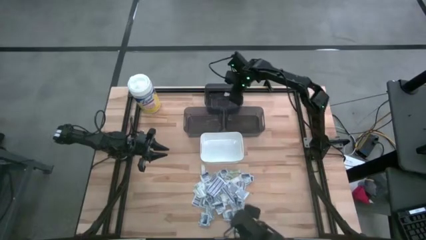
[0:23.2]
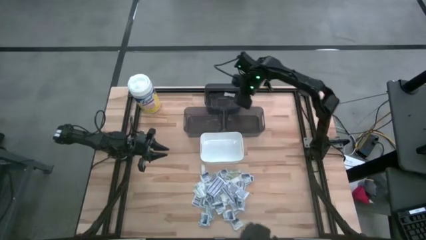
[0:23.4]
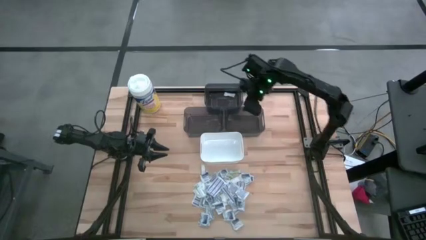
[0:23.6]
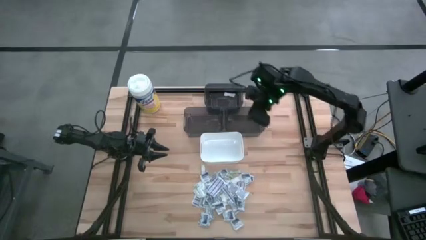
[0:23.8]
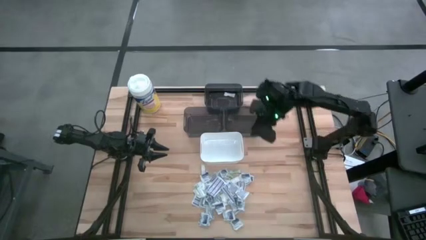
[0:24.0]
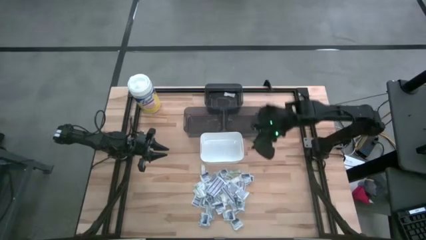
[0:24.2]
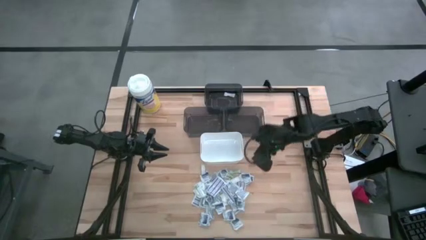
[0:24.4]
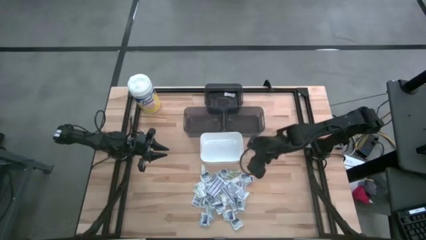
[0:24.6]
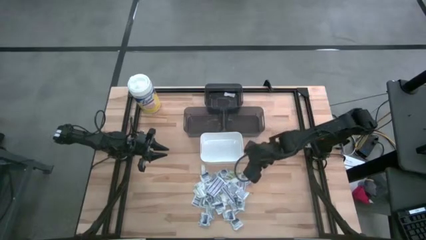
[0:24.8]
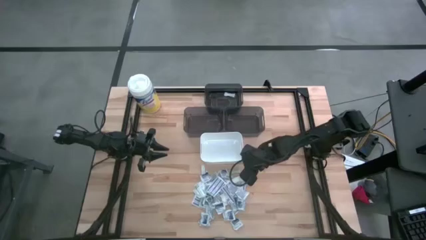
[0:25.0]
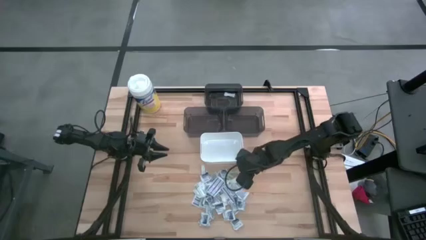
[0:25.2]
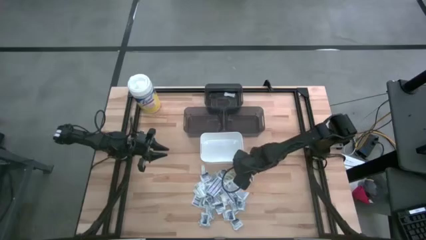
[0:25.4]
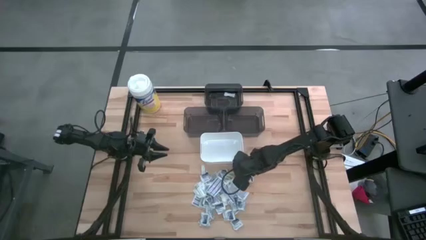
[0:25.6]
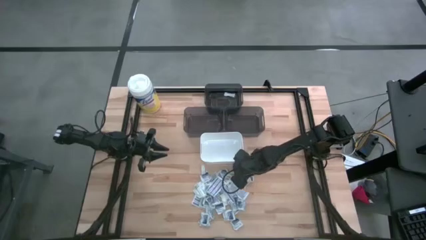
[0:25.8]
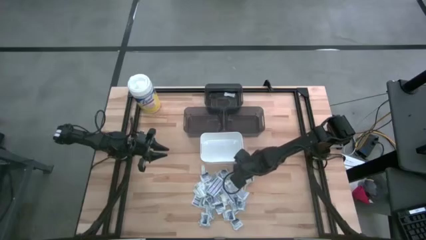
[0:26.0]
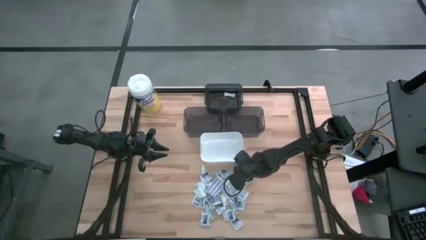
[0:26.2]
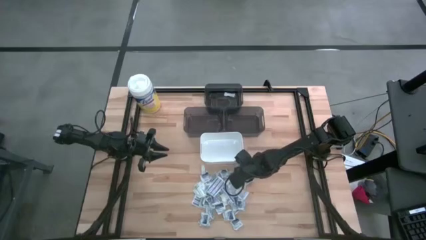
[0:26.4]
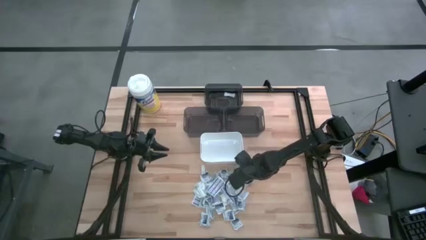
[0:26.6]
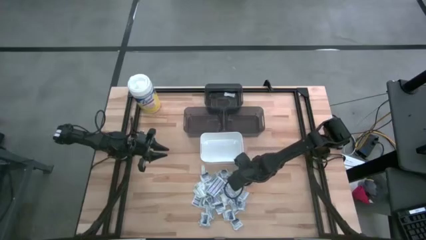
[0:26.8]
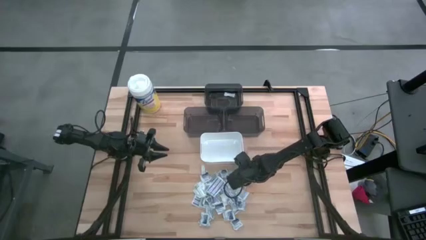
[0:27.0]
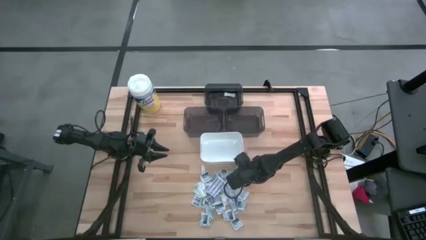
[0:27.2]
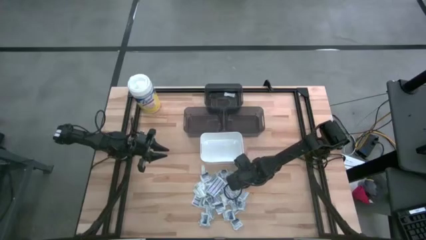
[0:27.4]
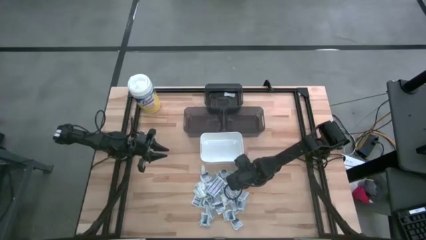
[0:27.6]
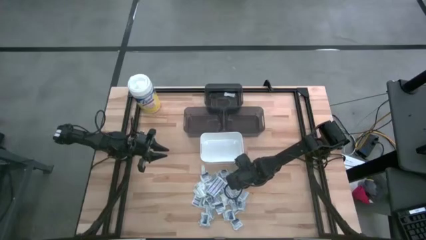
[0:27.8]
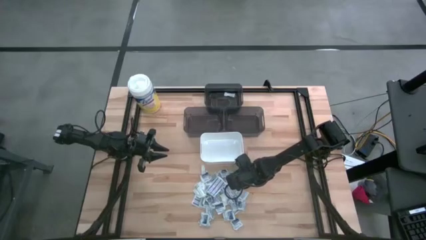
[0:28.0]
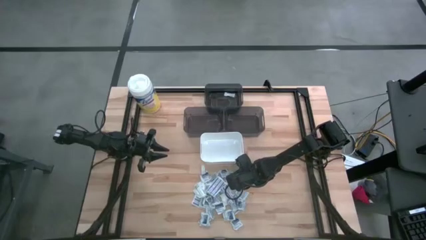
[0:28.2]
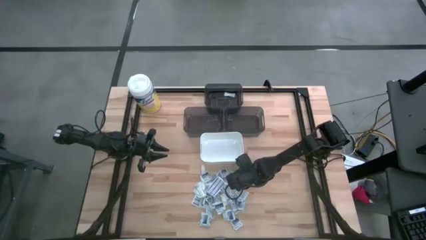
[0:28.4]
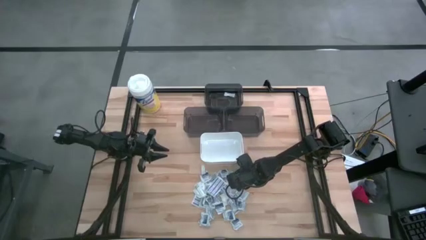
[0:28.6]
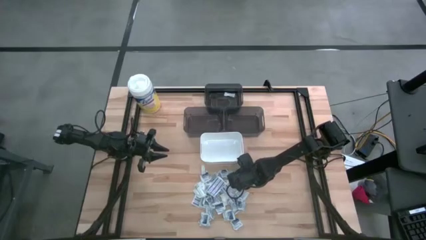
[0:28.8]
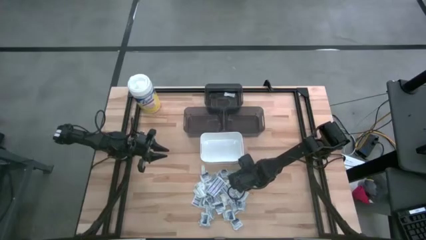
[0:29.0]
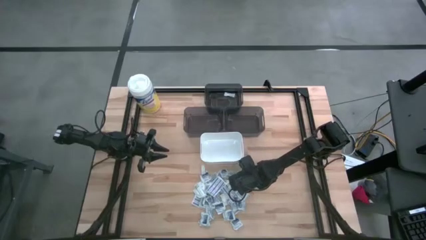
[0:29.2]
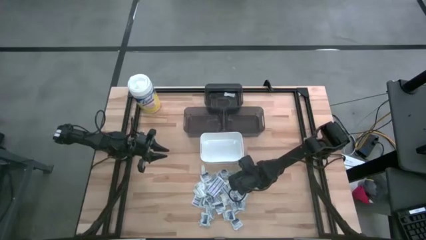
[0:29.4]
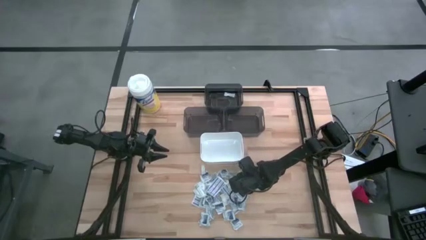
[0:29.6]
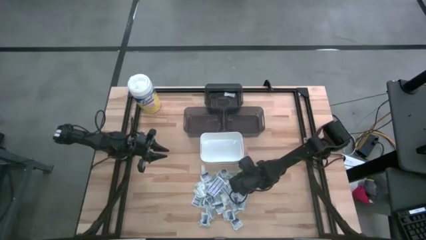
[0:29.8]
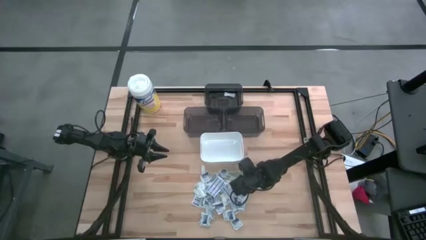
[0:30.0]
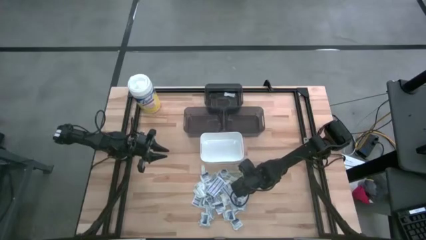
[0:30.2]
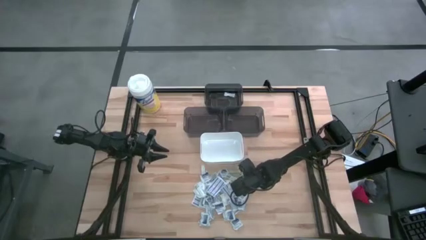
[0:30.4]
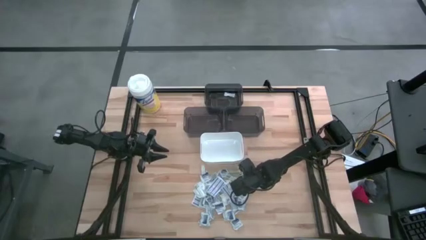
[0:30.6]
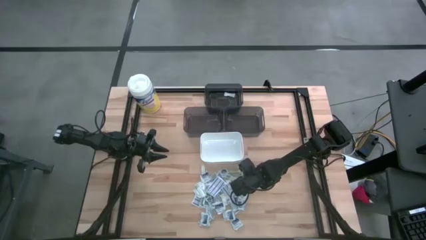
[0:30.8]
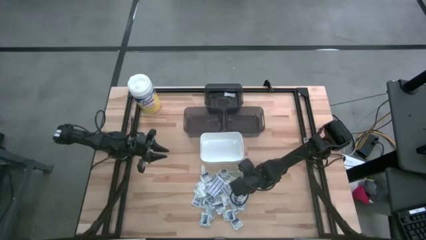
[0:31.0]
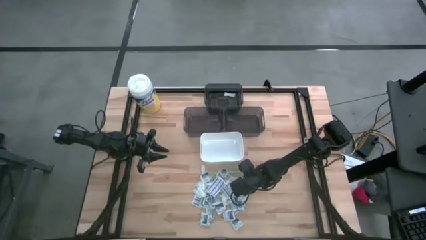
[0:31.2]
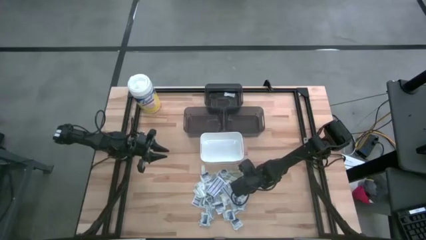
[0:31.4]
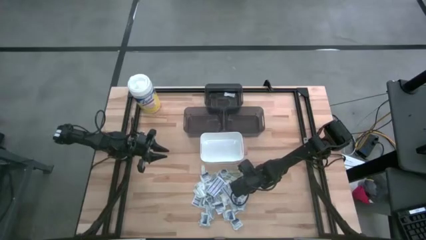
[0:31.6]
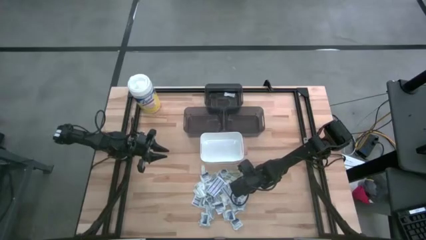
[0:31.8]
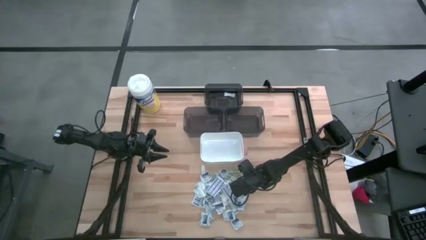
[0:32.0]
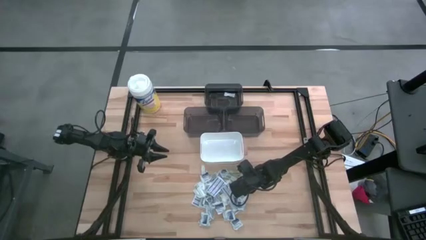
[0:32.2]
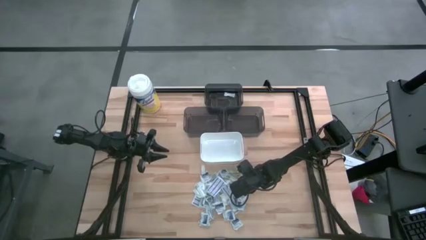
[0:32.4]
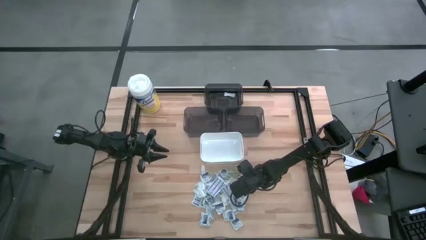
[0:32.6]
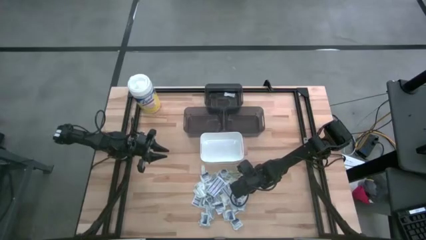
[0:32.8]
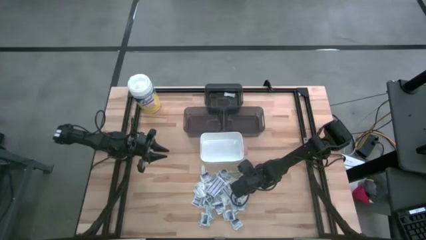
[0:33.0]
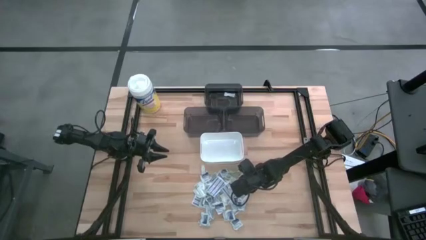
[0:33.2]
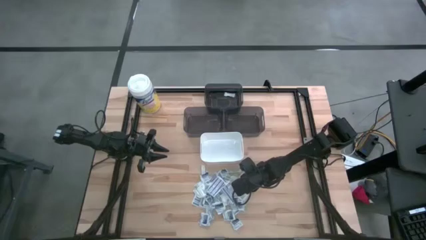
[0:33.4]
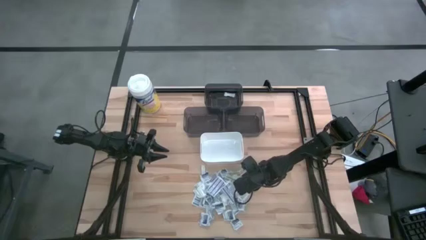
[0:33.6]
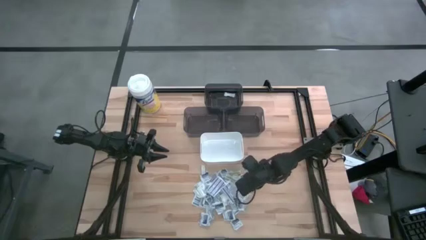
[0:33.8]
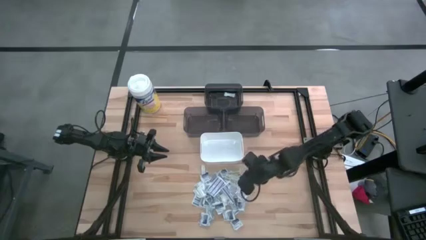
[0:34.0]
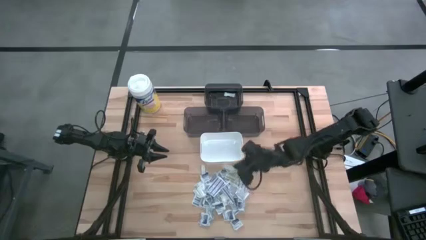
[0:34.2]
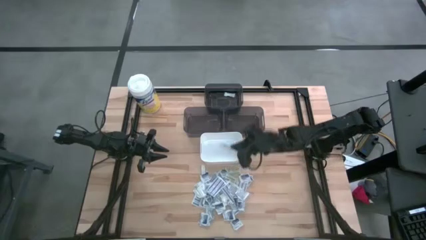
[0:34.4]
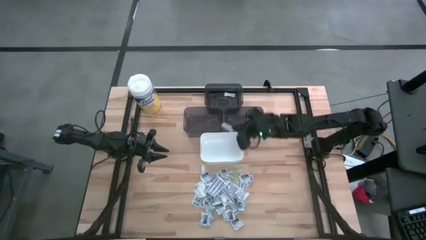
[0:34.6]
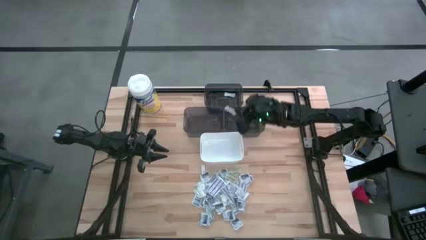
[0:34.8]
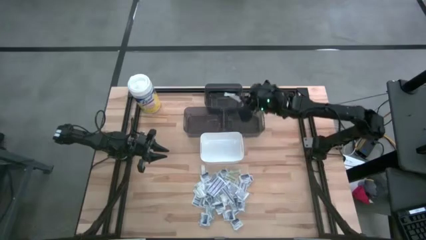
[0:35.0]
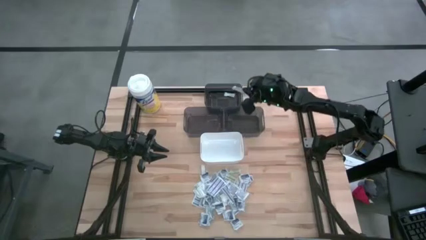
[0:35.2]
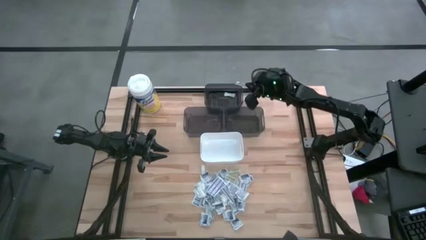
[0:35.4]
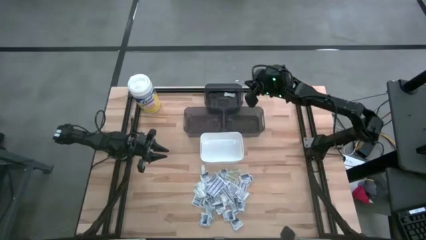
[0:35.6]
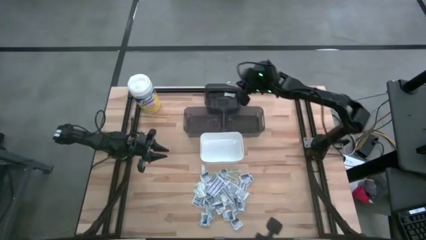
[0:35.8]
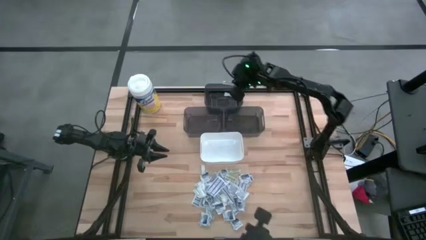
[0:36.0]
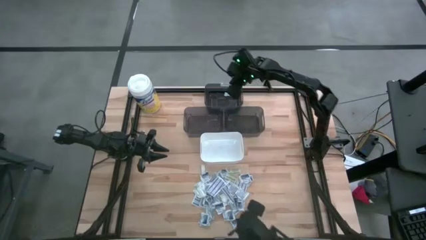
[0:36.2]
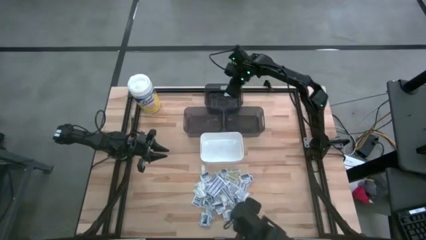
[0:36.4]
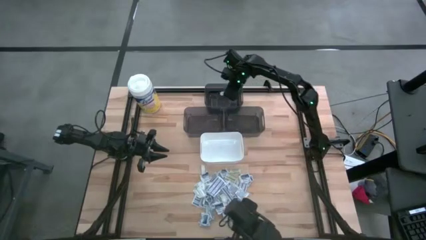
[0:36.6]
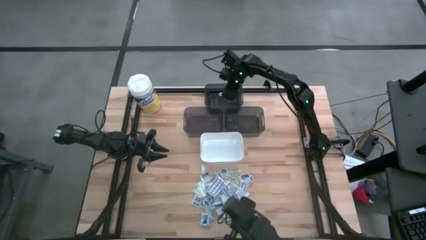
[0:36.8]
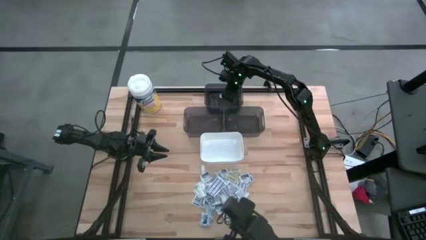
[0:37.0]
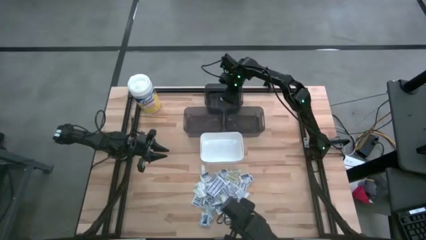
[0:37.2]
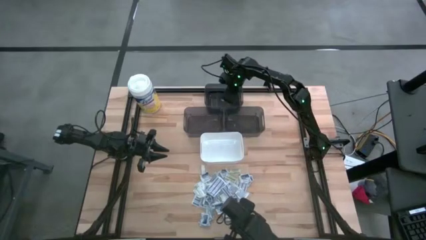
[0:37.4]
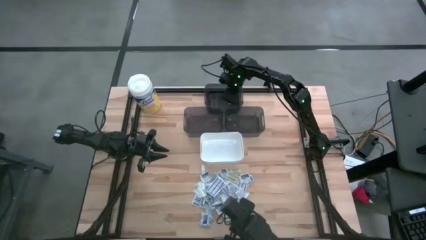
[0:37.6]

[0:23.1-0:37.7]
Task: Pick & Place First Aid Supplies
Put the green bandage into the top black bin
